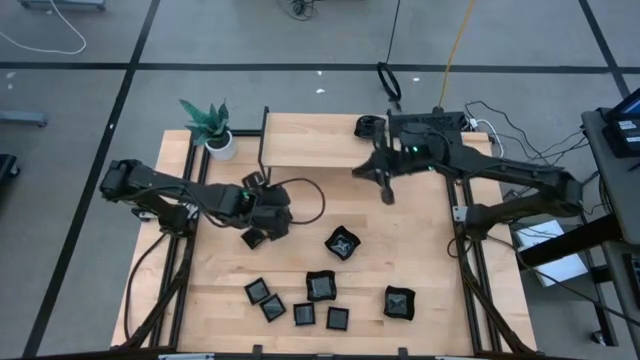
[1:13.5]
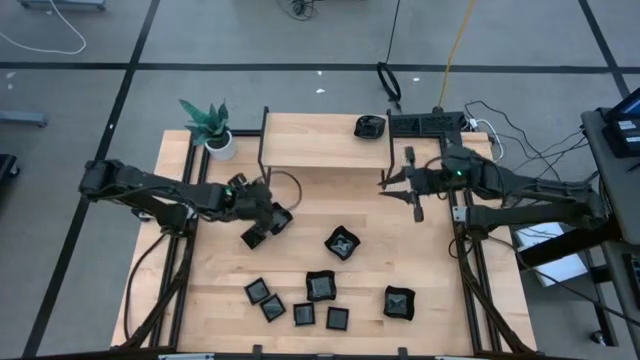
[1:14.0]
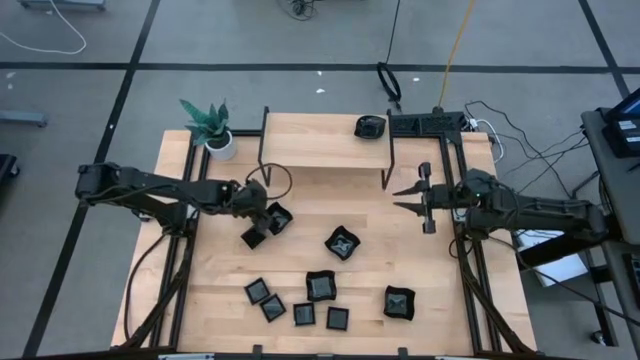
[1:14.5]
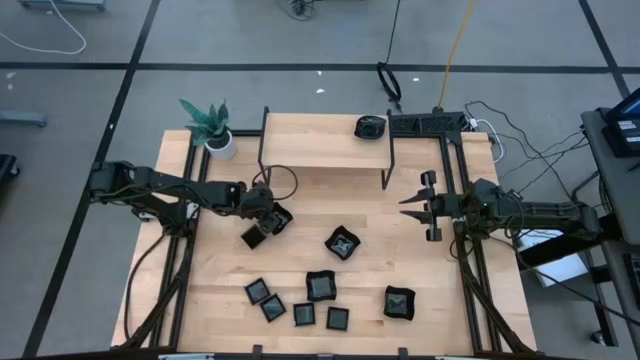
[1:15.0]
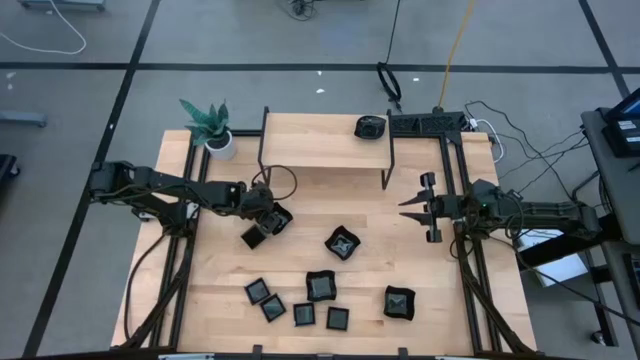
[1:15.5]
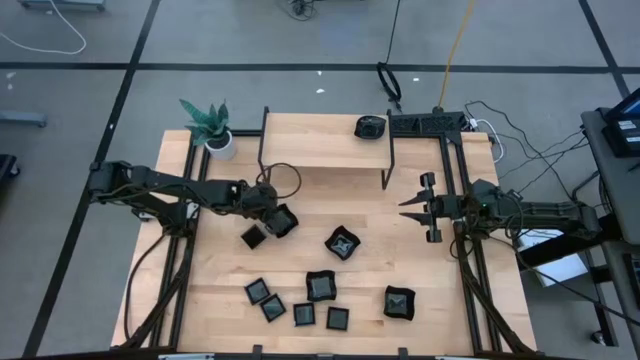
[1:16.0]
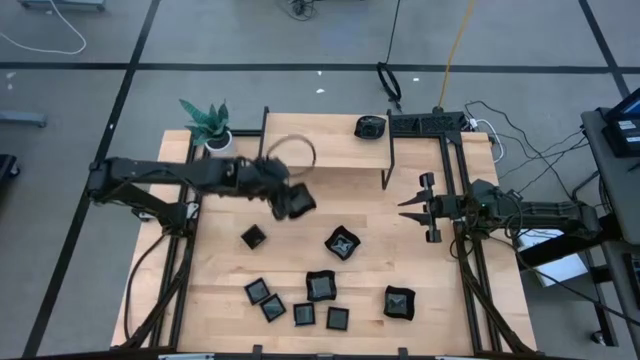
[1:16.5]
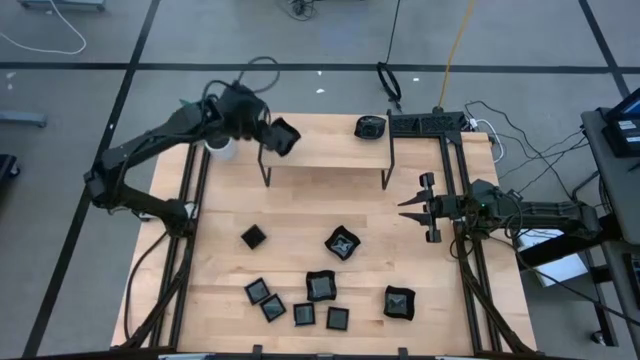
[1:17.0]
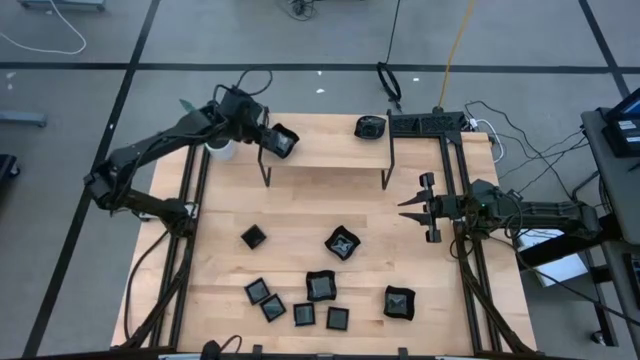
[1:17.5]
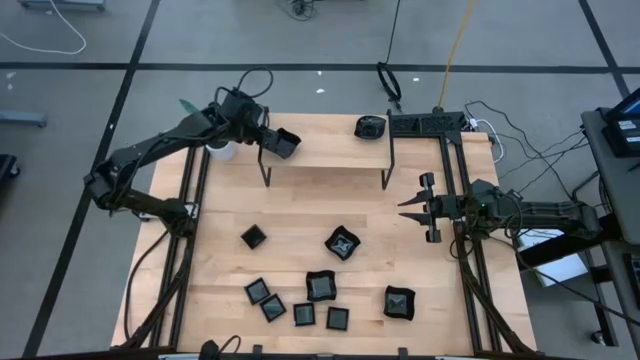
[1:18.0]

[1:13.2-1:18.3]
Task: Pick & Place Mini shaped plates
Put the black distorted square plate on the shelf

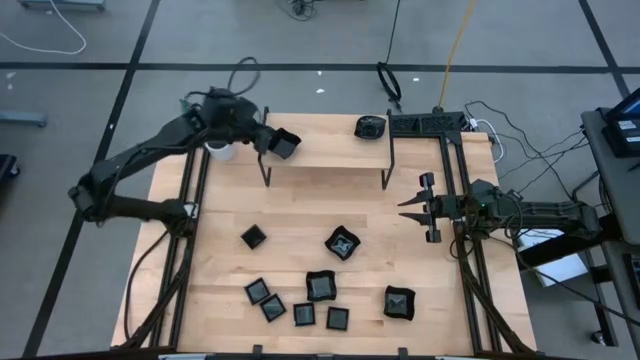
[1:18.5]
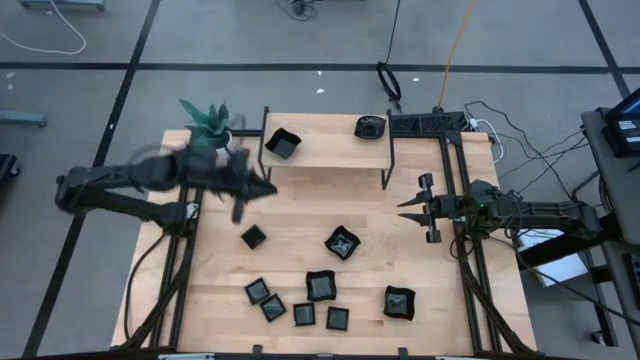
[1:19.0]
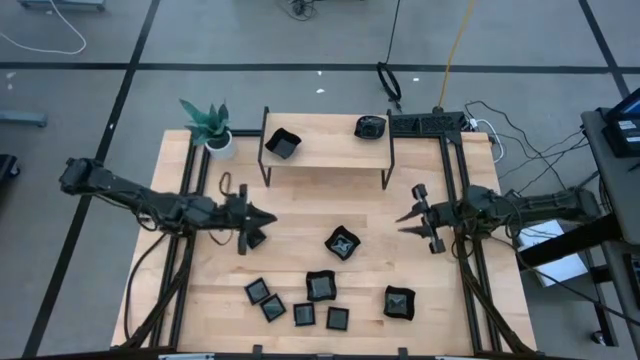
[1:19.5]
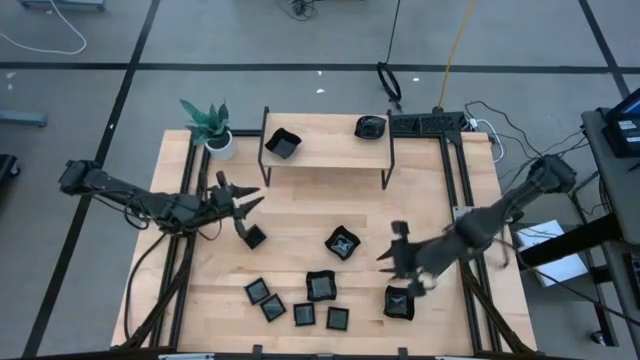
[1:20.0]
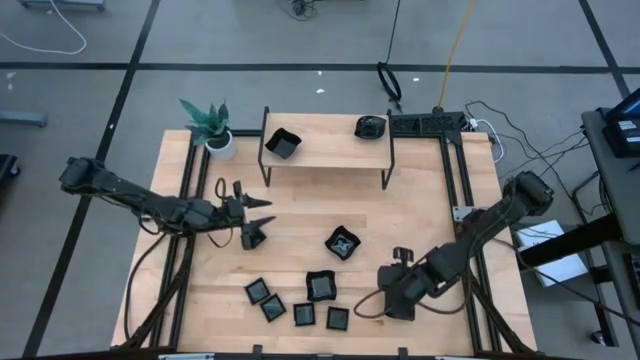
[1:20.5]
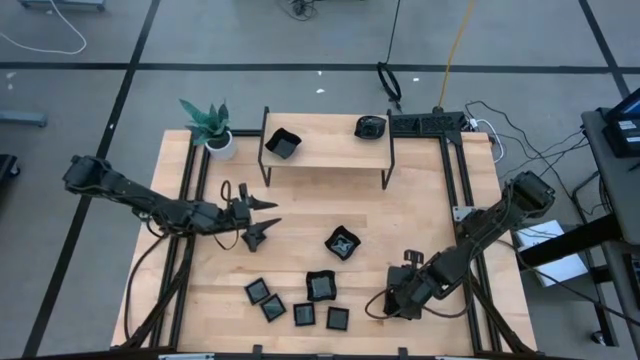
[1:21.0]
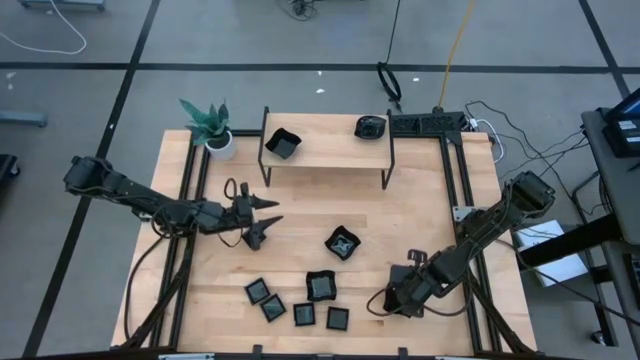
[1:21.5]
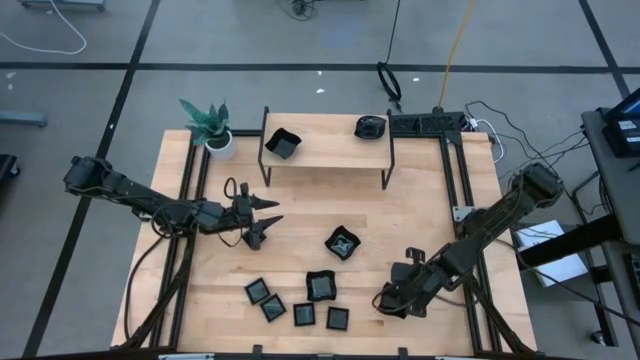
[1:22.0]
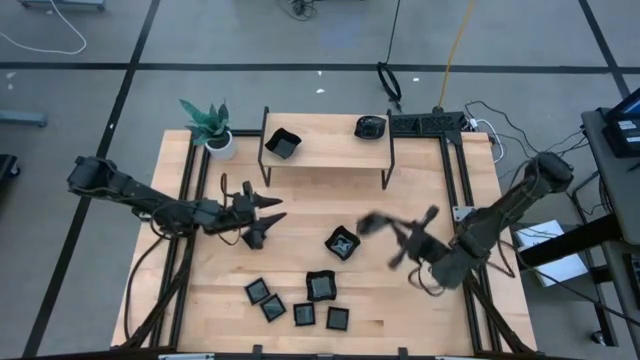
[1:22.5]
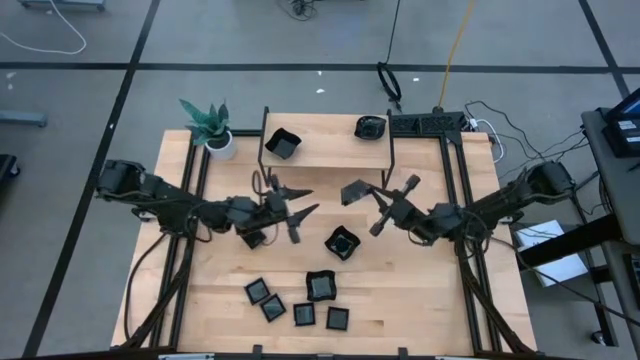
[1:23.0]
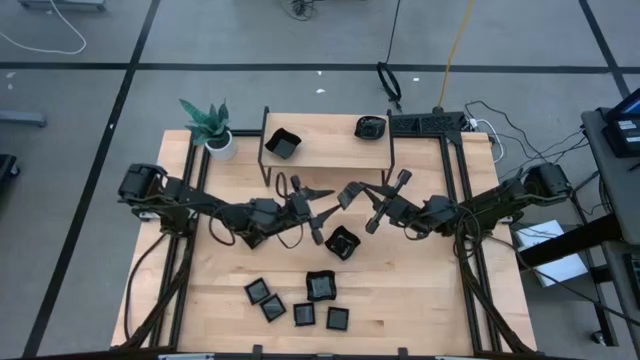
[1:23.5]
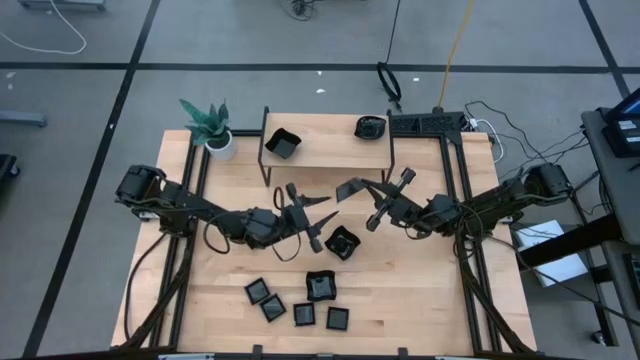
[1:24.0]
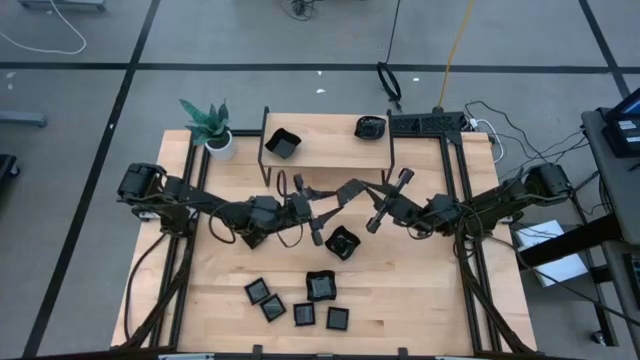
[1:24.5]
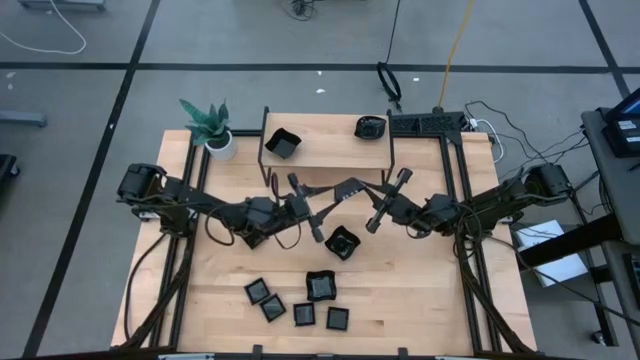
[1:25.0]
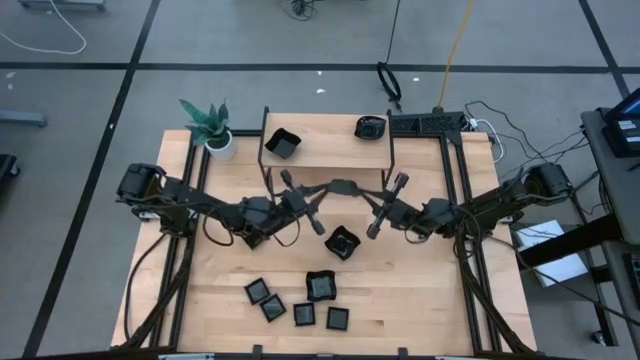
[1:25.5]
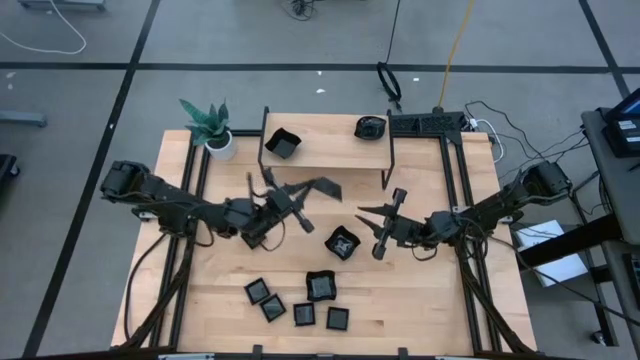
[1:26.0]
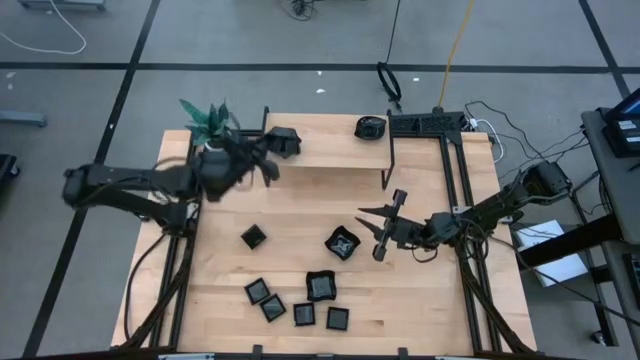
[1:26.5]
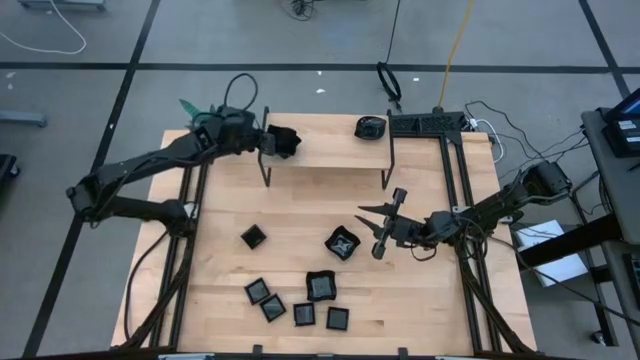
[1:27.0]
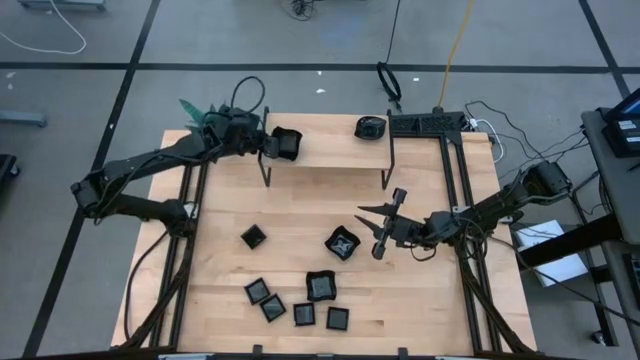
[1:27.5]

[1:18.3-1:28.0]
Stack the black distorted square plate on top of the other black distorted square plate on the shelf

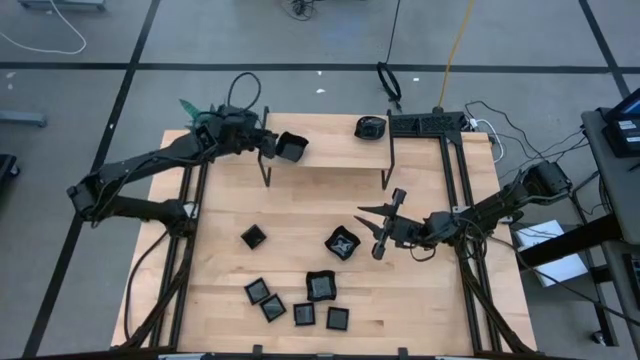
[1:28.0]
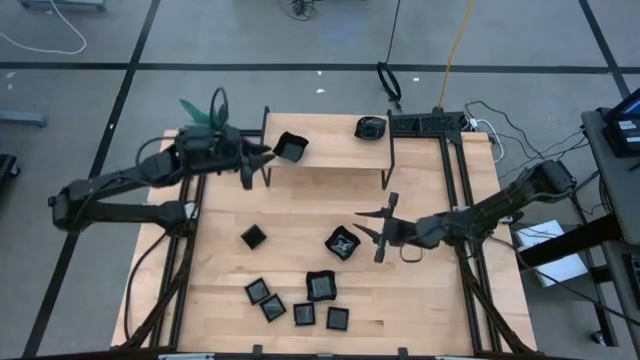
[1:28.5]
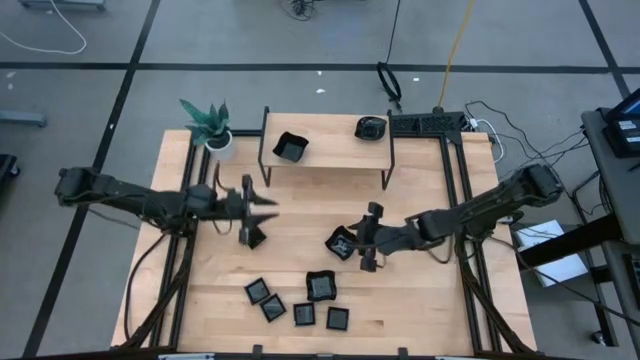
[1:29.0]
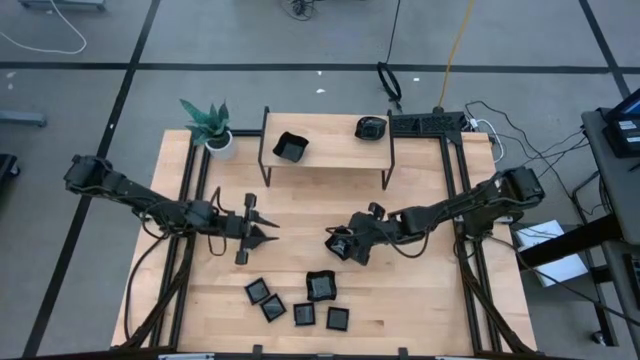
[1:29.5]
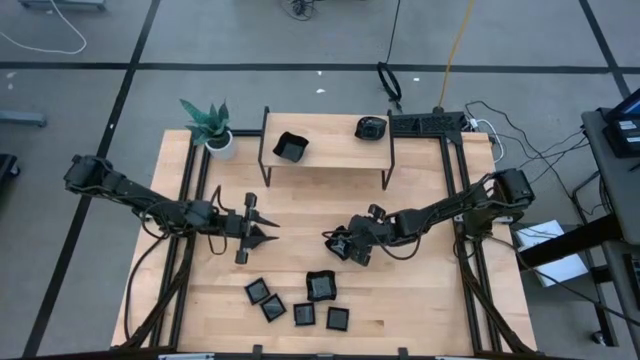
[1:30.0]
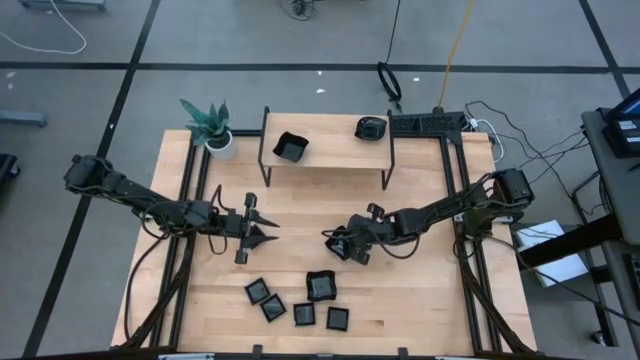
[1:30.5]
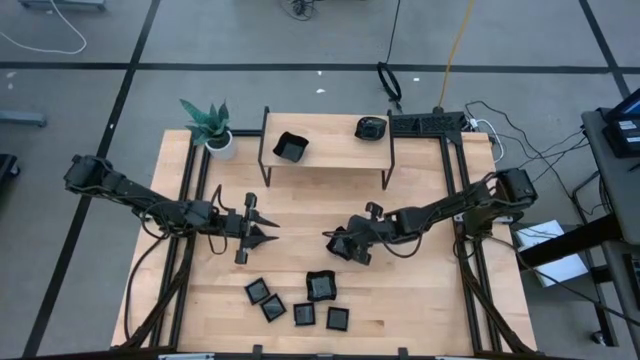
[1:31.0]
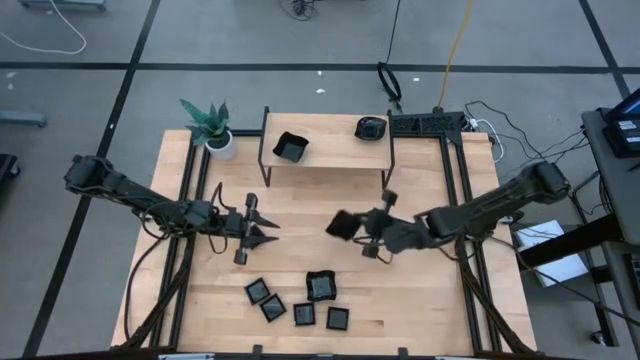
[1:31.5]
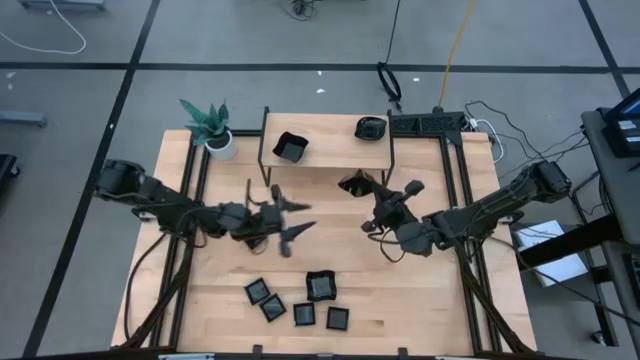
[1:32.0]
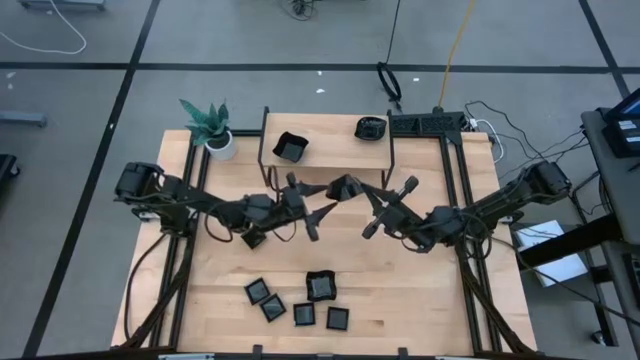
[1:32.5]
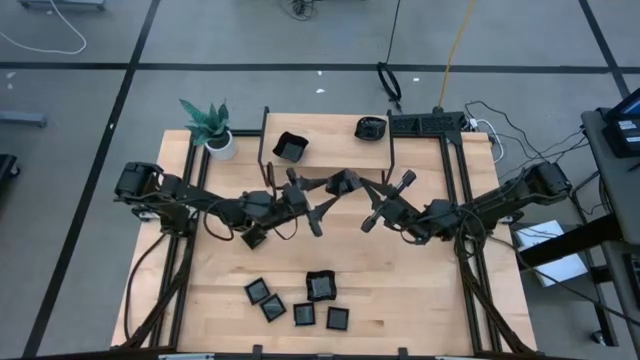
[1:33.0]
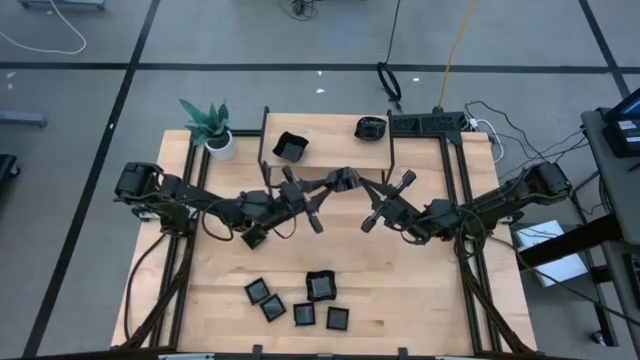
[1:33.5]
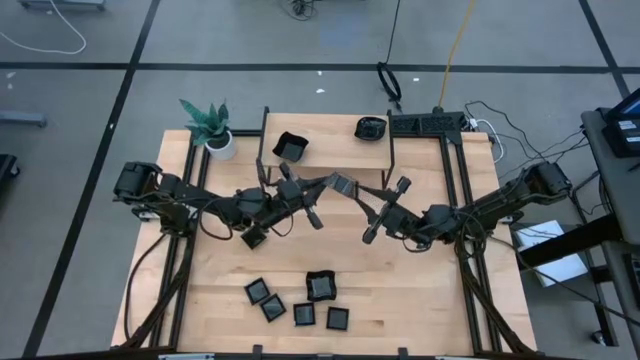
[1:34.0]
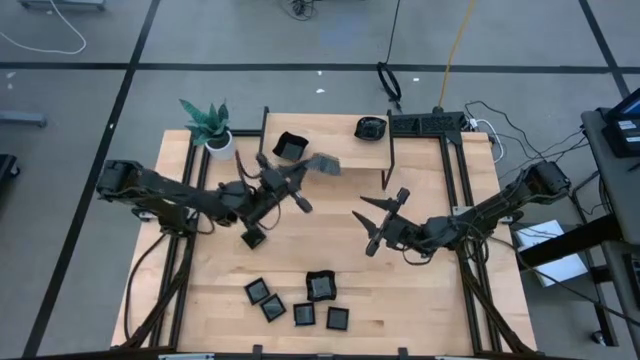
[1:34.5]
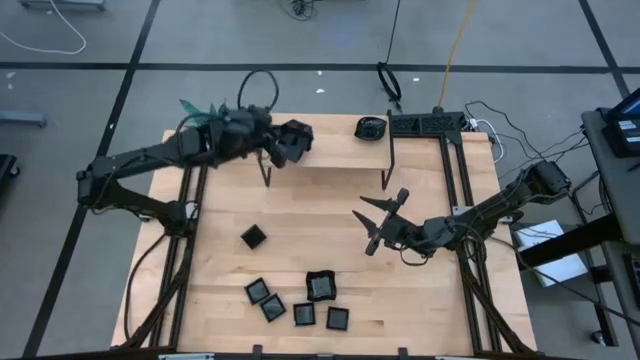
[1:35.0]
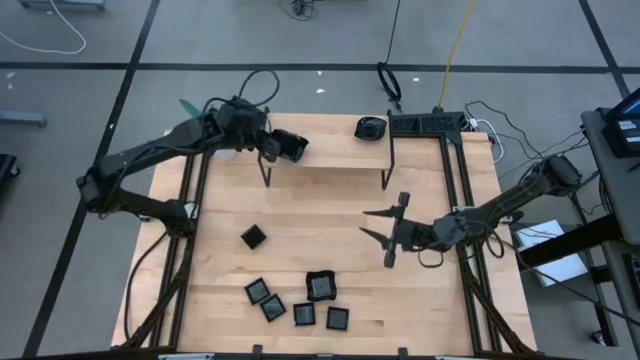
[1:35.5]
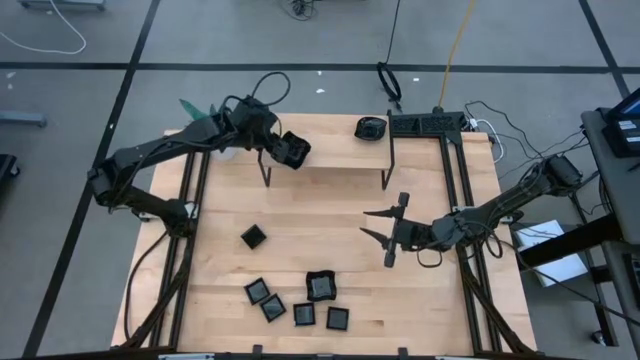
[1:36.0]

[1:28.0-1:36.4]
Stack the black distorted square plate on top of the other black distorted square plates on the shelf
